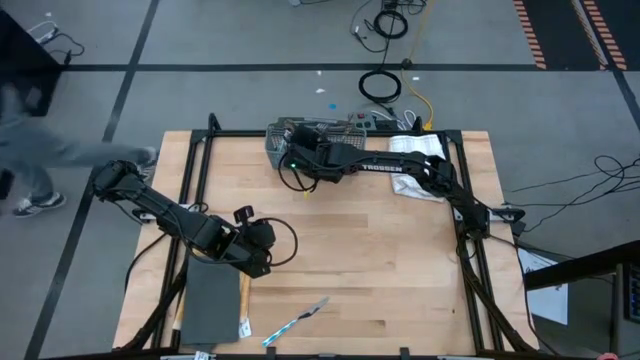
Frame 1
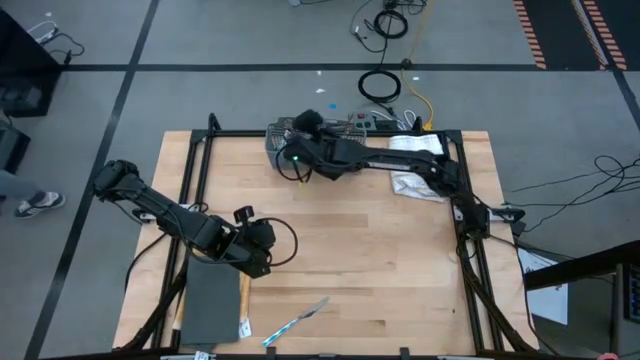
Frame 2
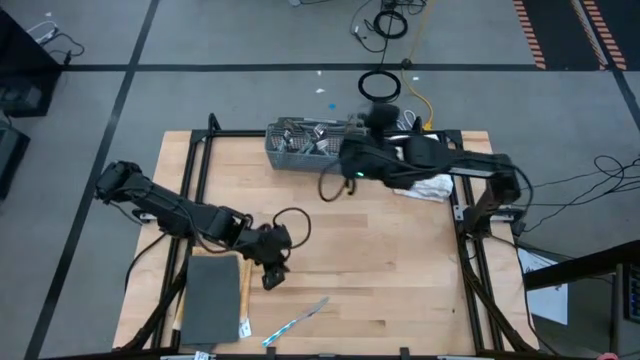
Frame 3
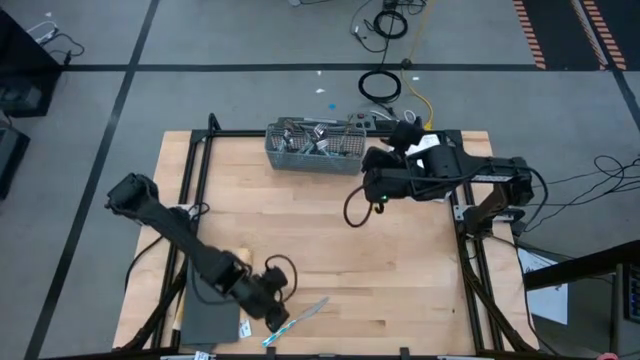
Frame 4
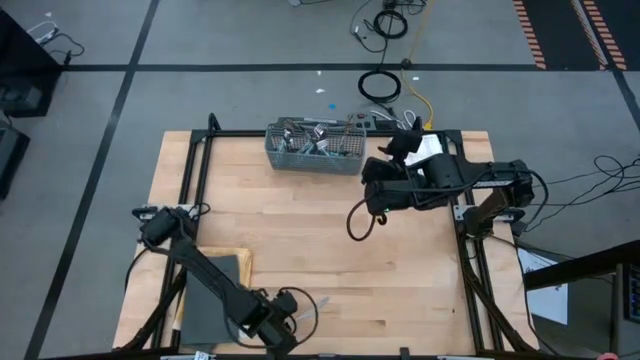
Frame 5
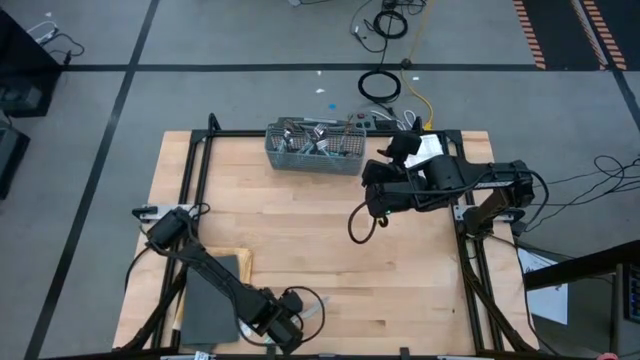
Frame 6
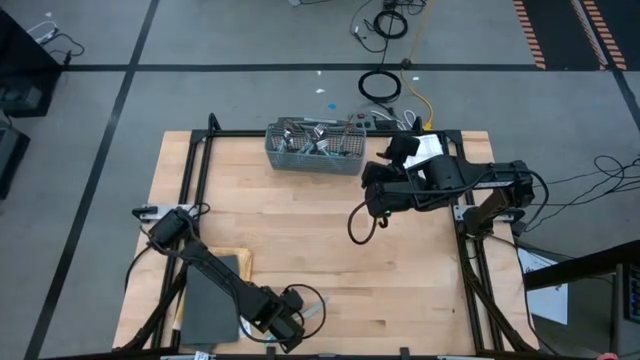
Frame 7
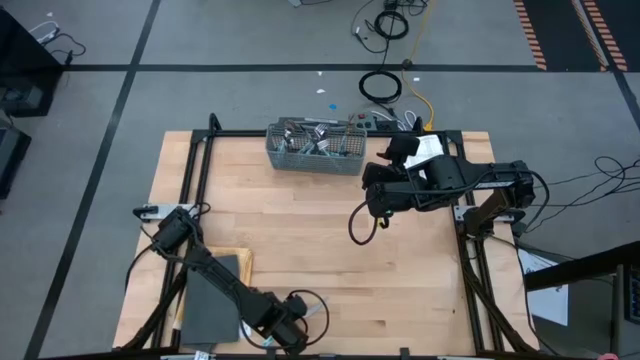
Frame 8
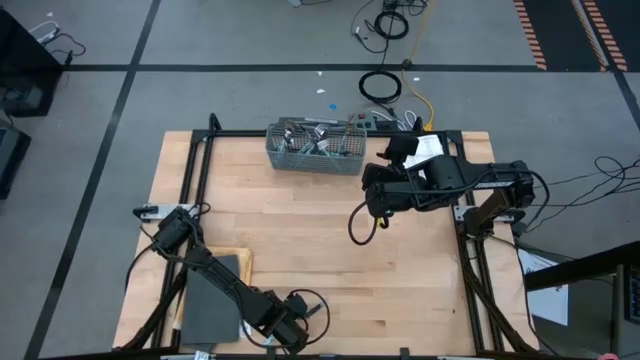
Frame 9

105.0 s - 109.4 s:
Task: Sort silverware
Put the blue knife into the silverware basket

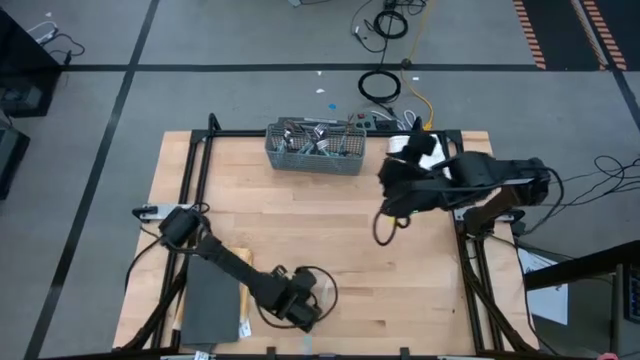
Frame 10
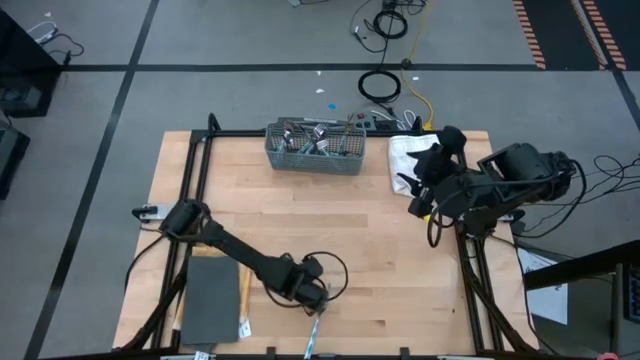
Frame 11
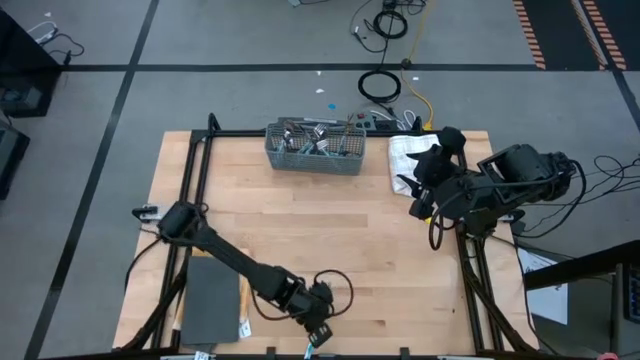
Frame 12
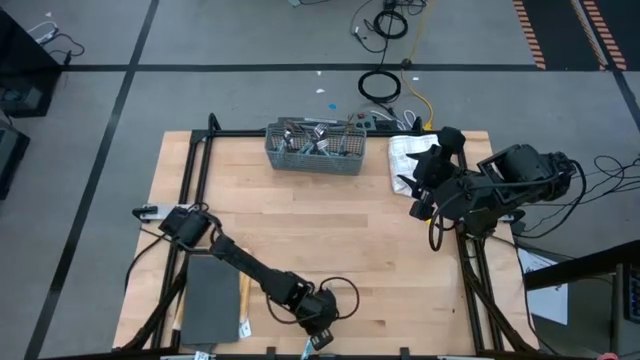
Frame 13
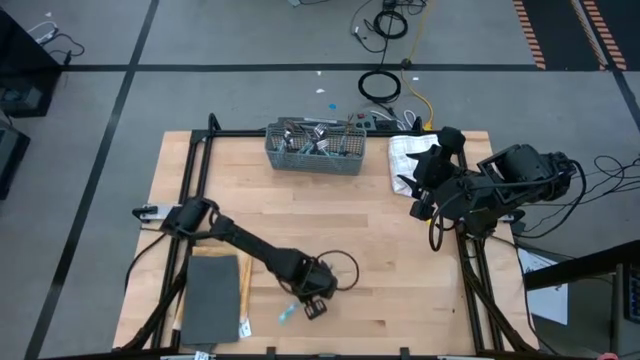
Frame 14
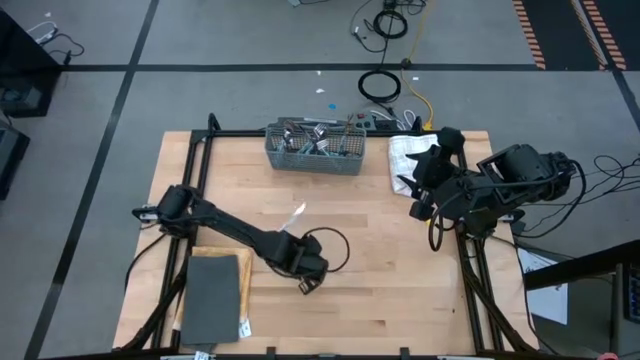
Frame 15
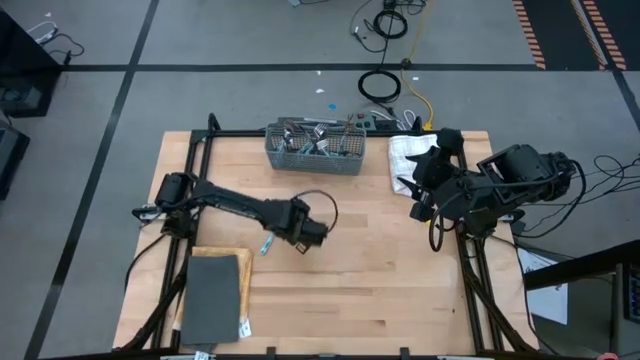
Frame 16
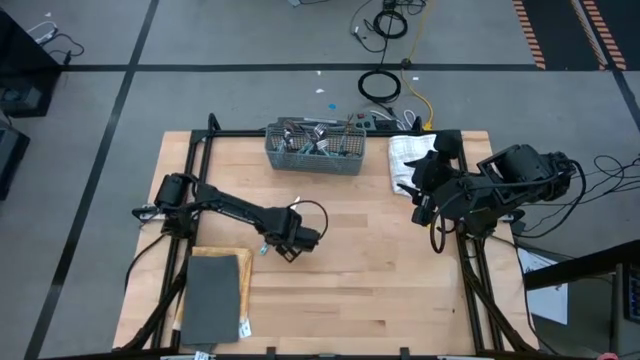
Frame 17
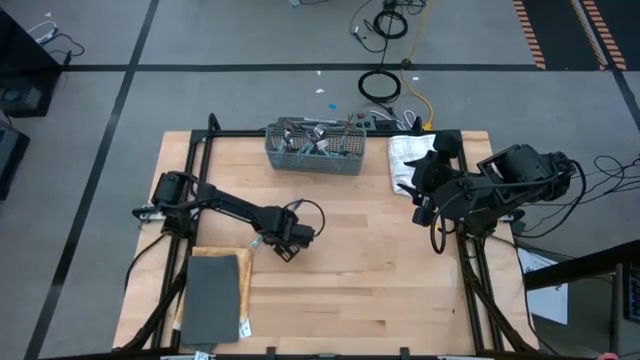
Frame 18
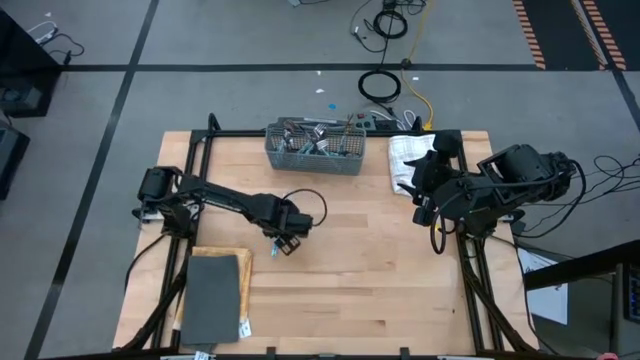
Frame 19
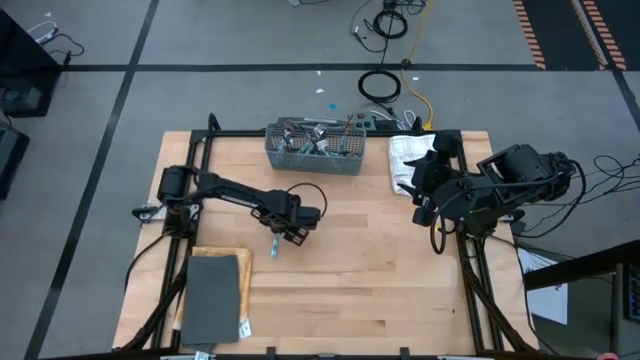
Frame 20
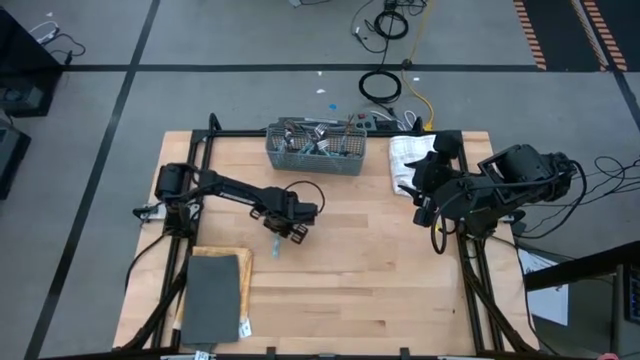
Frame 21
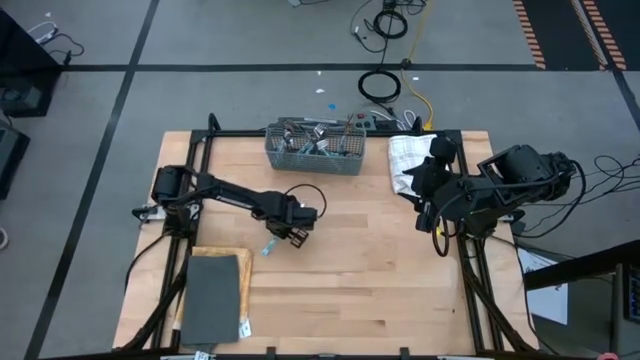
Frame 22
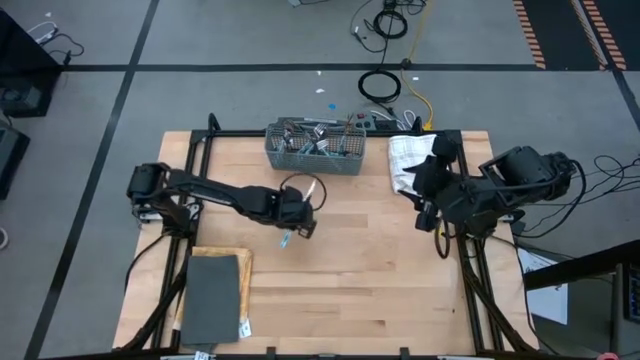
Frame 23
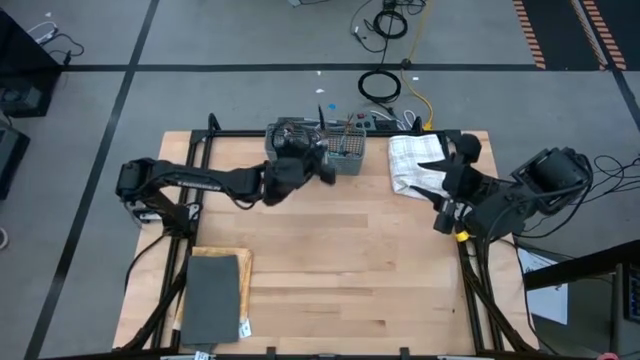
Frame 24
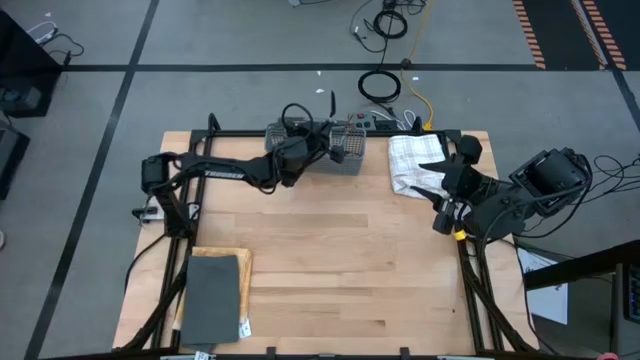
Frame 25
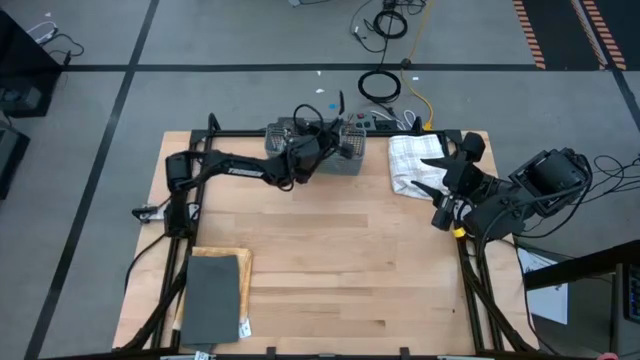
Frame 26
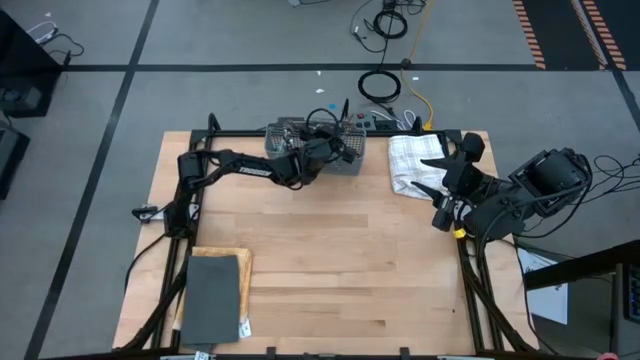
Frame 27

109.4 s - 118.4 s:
Put the blue knife into the silverware basket

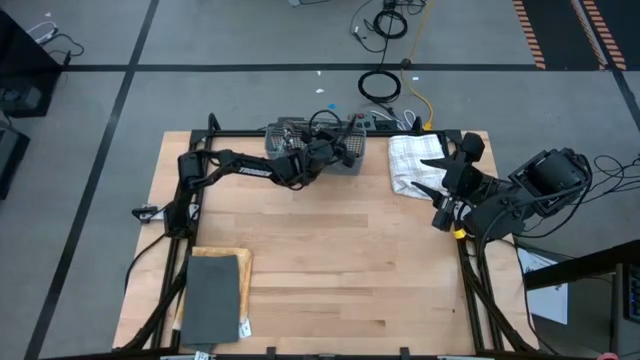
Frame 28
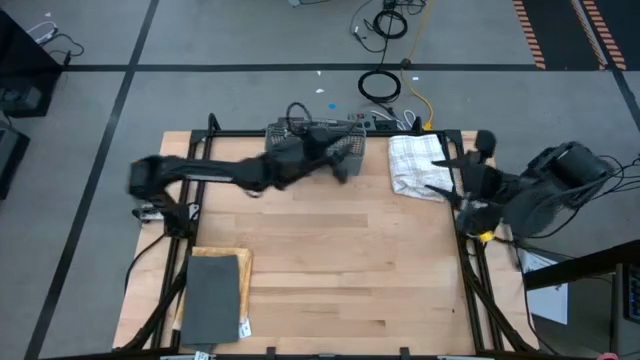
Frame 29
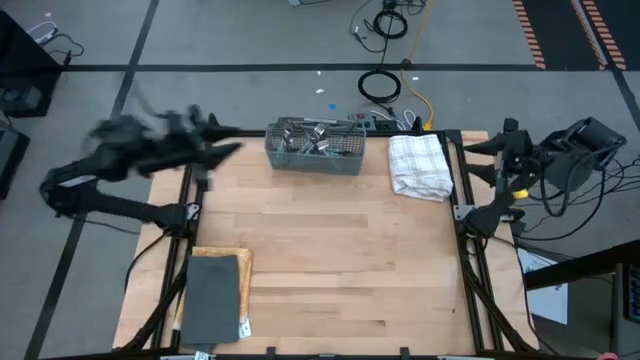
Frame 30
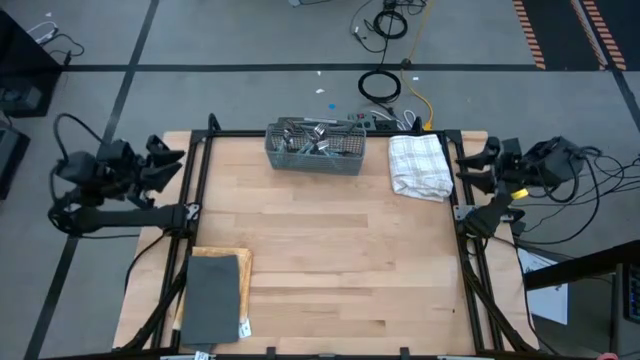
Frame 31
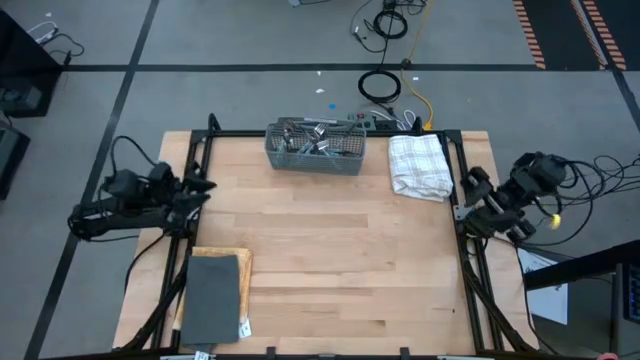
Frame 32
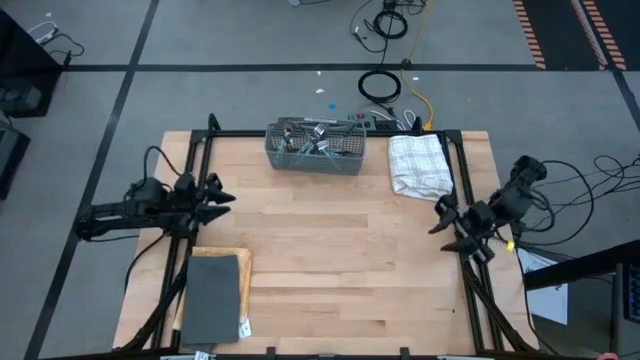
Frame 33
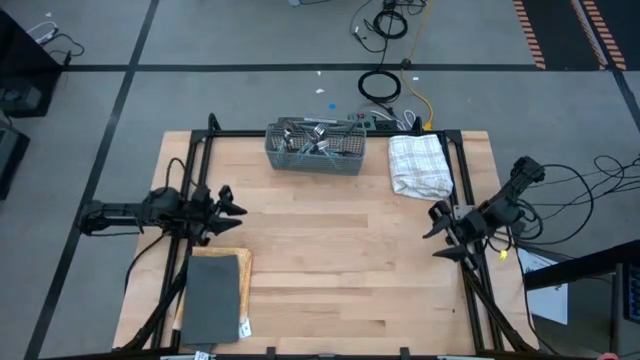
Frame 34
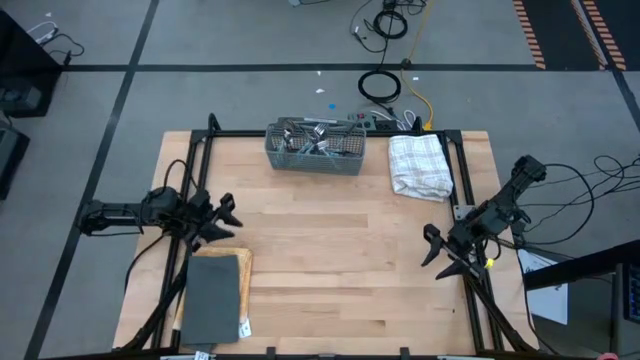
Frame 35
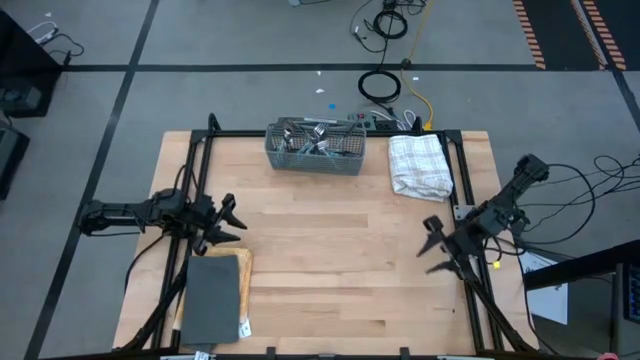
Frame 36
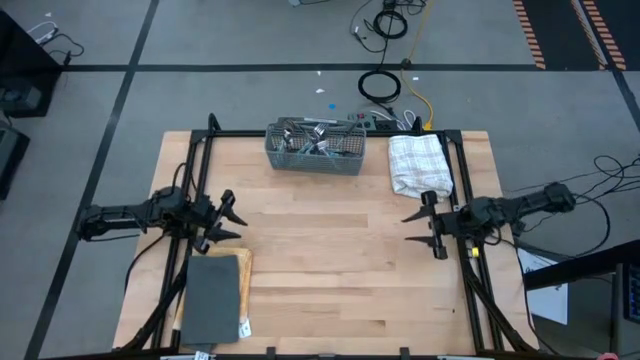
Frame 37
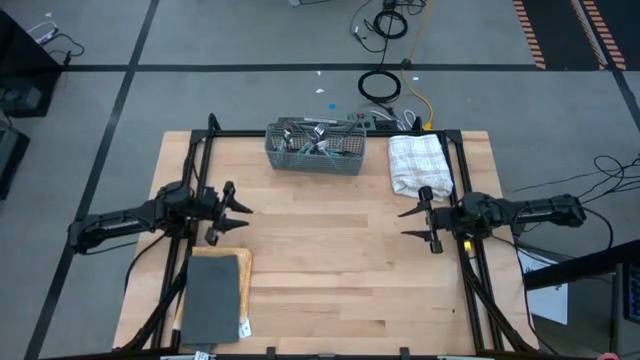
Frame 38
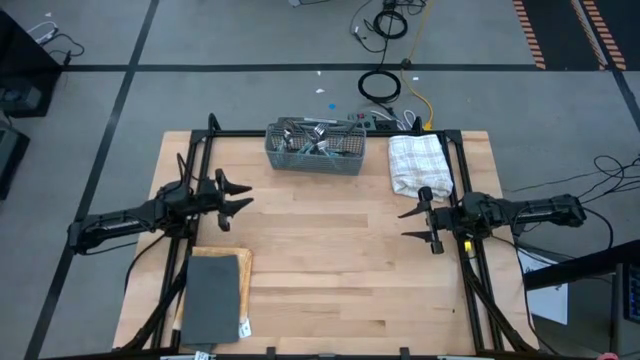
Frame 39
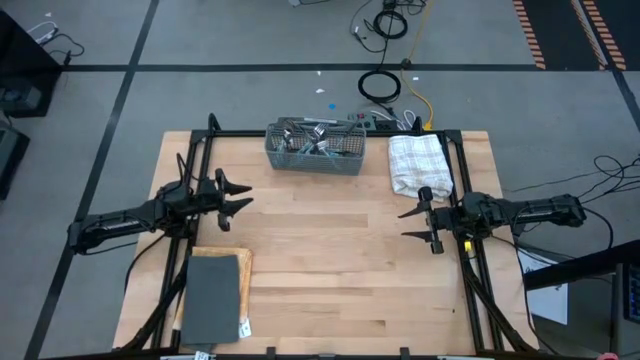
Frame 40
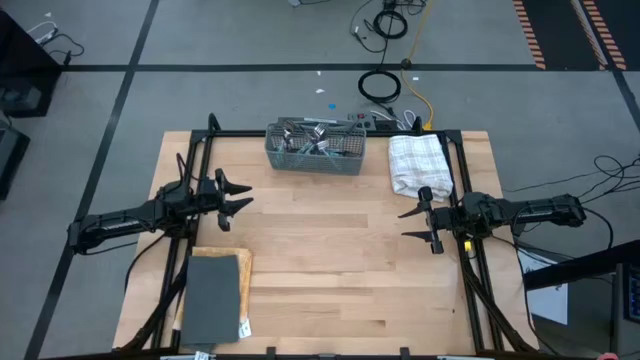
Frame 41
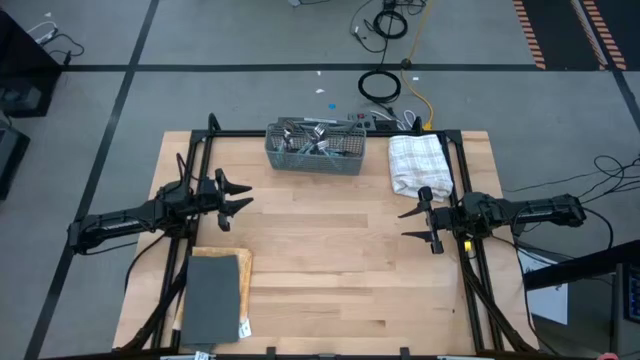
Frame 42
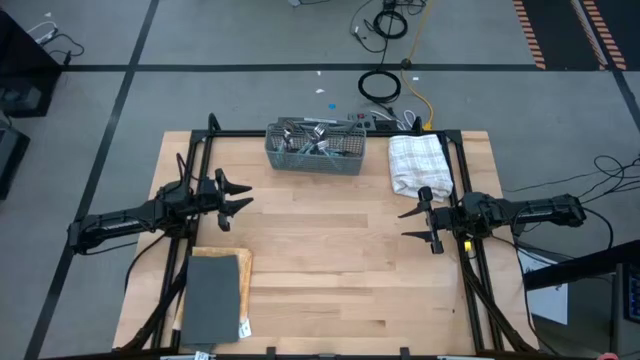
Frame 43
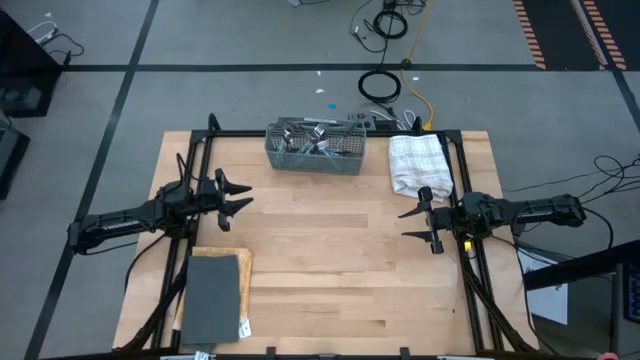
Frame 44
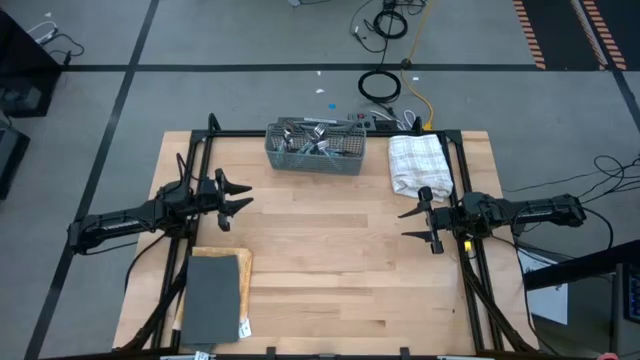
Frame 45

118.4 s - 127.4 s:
Return to Home Position
